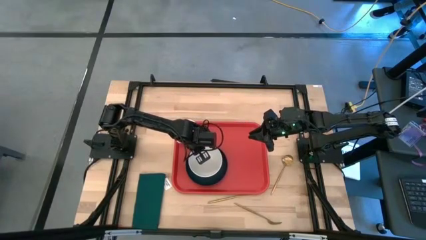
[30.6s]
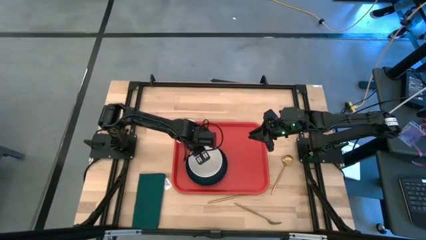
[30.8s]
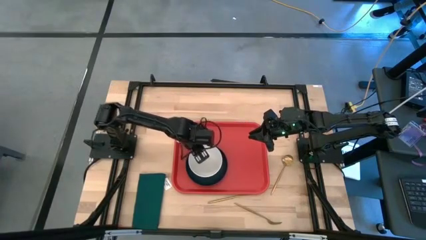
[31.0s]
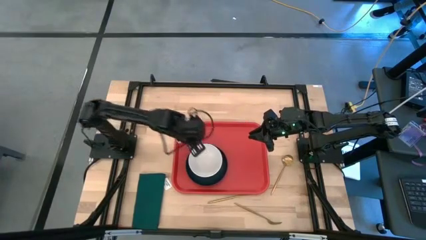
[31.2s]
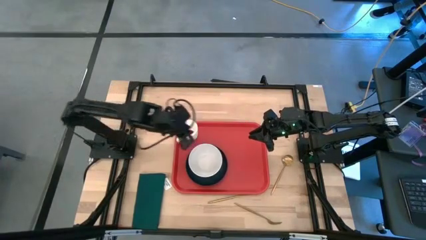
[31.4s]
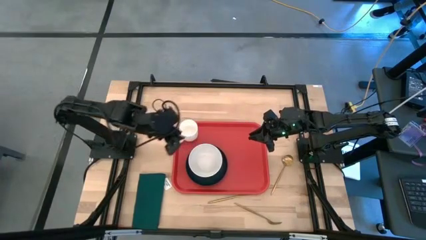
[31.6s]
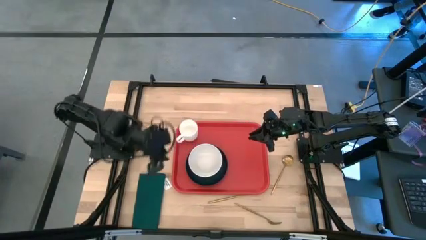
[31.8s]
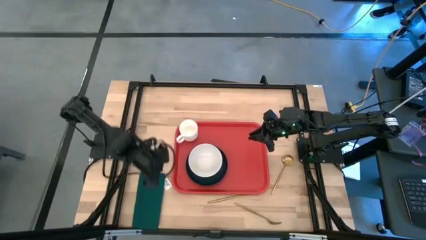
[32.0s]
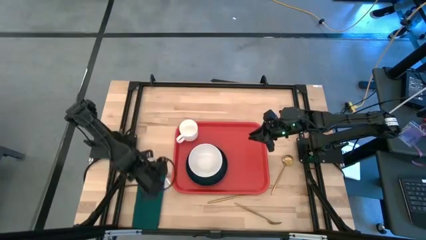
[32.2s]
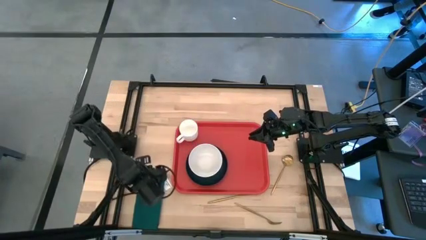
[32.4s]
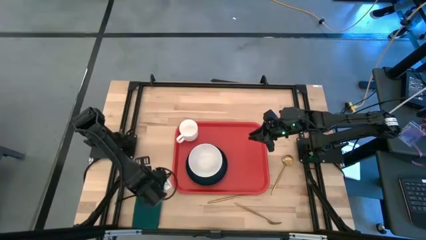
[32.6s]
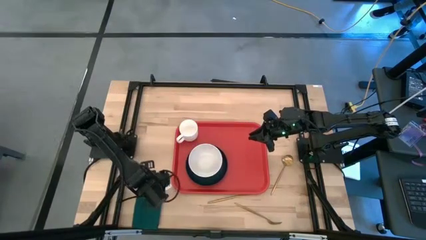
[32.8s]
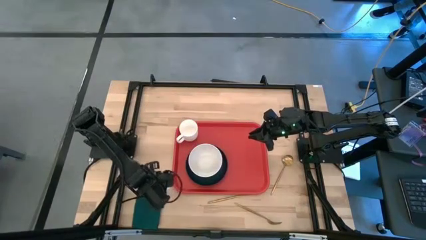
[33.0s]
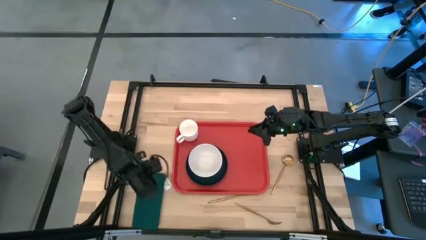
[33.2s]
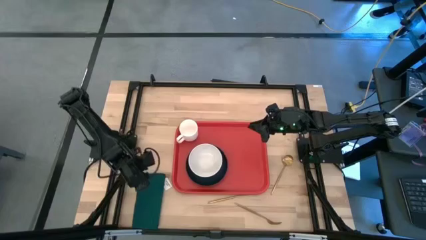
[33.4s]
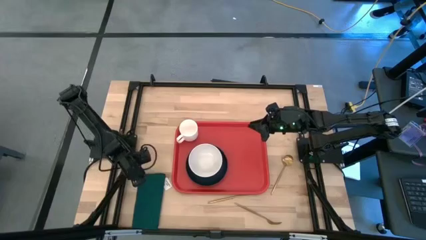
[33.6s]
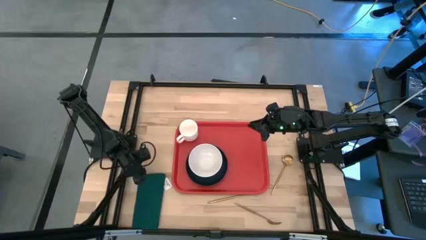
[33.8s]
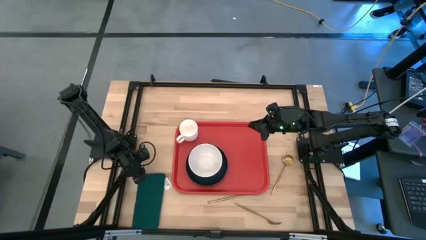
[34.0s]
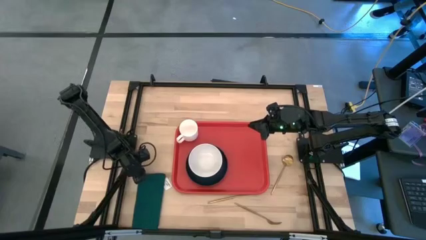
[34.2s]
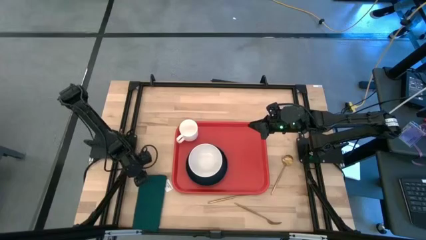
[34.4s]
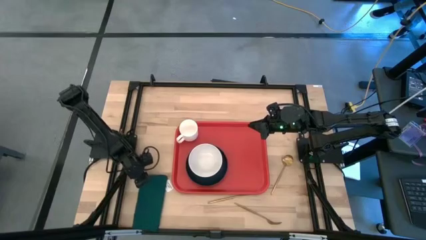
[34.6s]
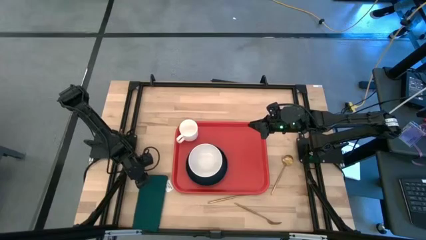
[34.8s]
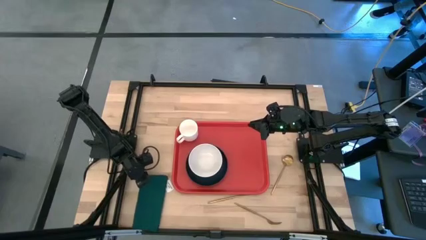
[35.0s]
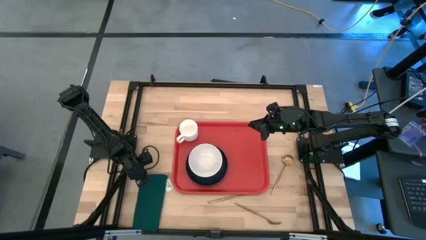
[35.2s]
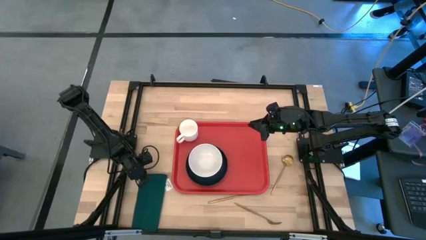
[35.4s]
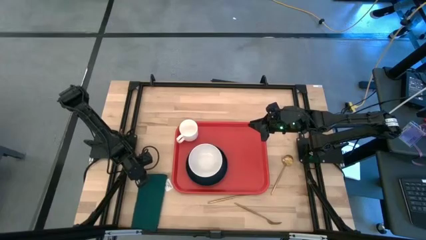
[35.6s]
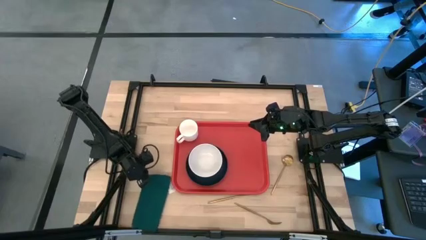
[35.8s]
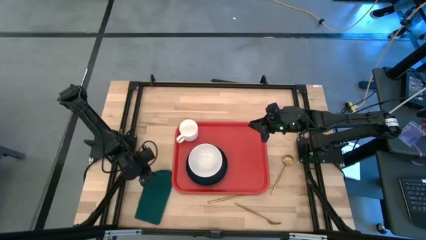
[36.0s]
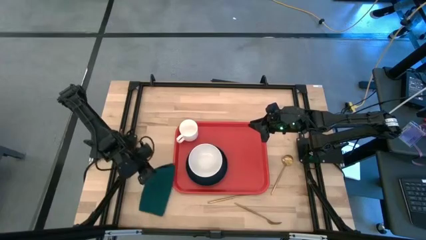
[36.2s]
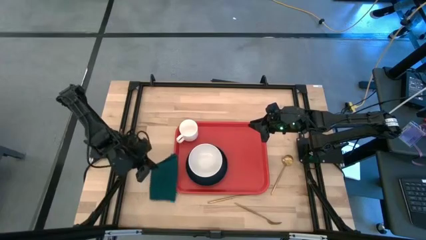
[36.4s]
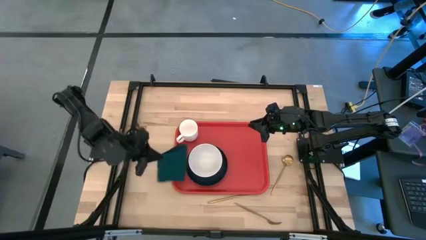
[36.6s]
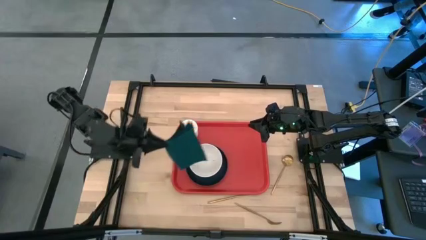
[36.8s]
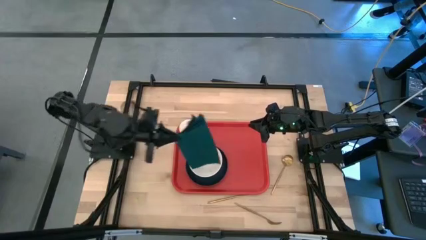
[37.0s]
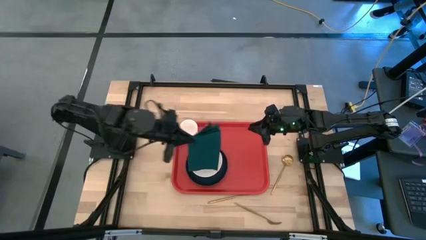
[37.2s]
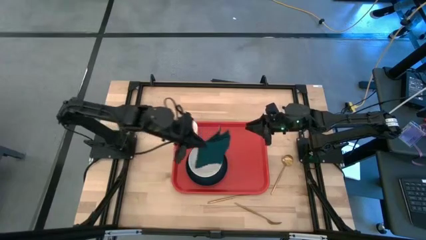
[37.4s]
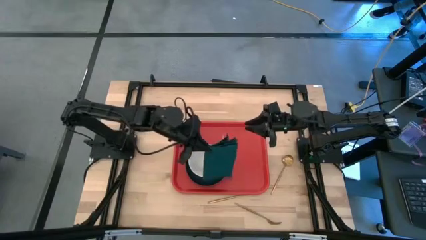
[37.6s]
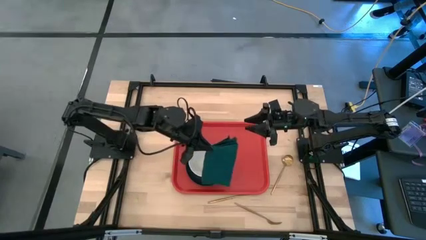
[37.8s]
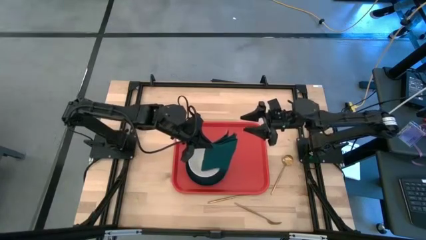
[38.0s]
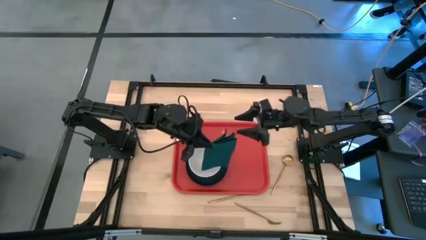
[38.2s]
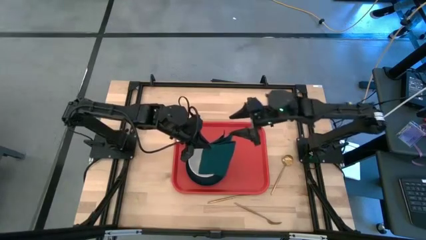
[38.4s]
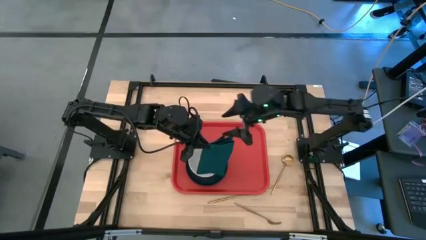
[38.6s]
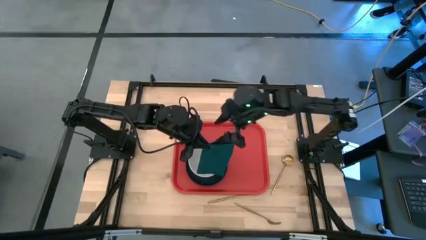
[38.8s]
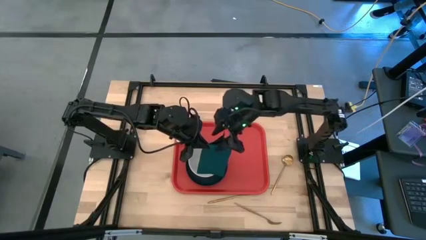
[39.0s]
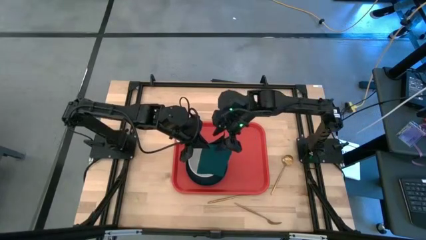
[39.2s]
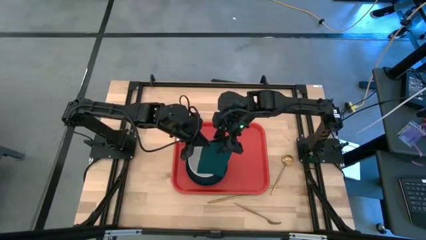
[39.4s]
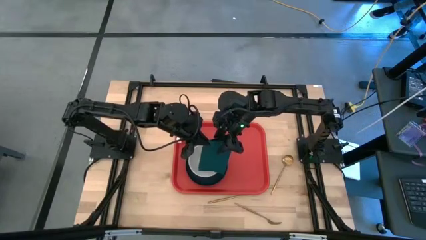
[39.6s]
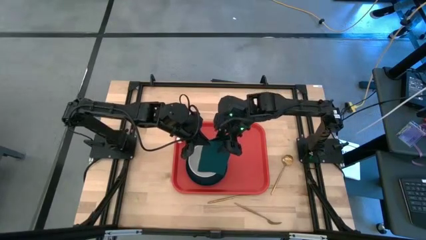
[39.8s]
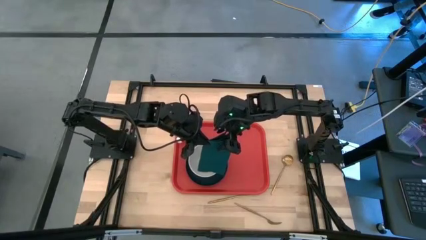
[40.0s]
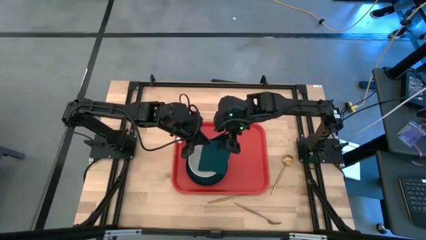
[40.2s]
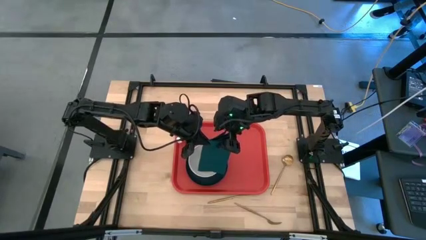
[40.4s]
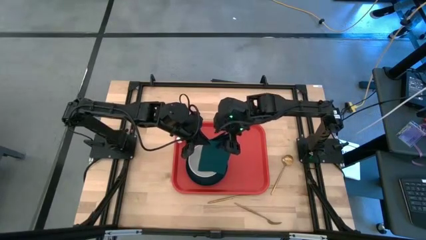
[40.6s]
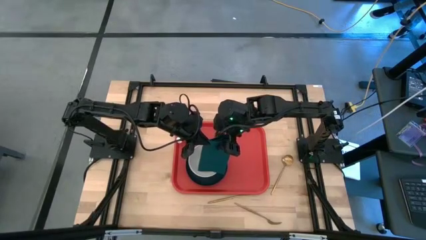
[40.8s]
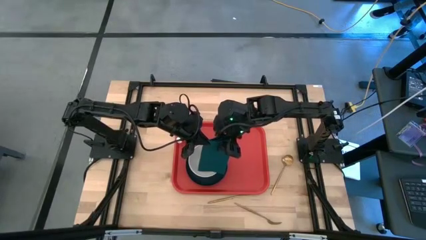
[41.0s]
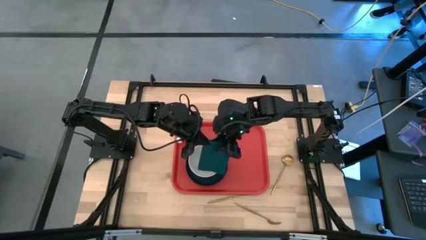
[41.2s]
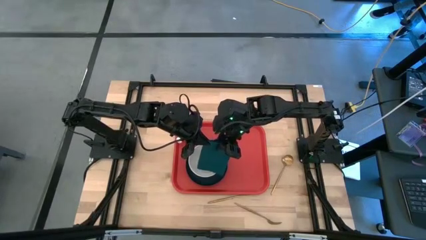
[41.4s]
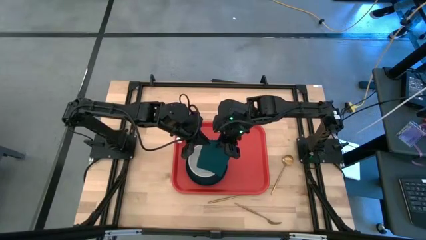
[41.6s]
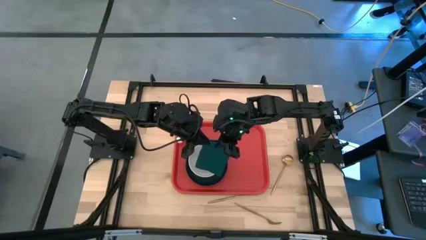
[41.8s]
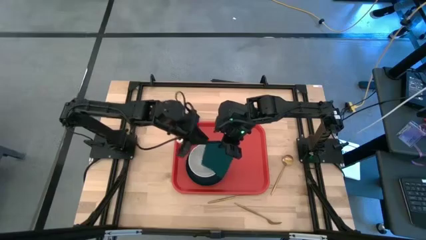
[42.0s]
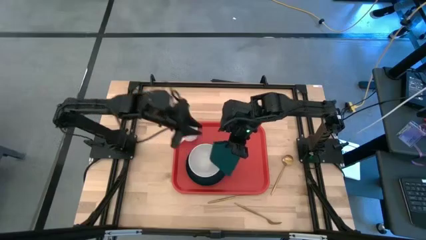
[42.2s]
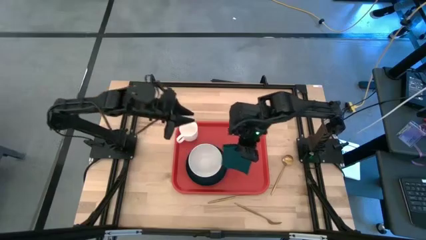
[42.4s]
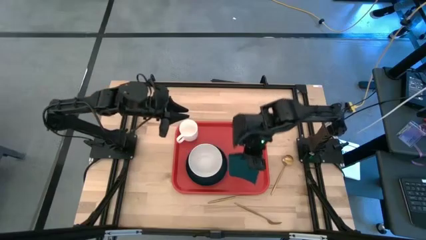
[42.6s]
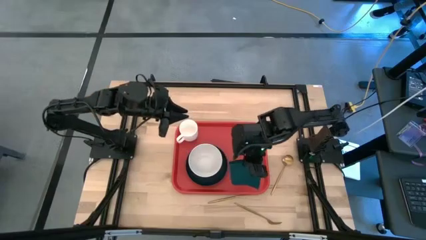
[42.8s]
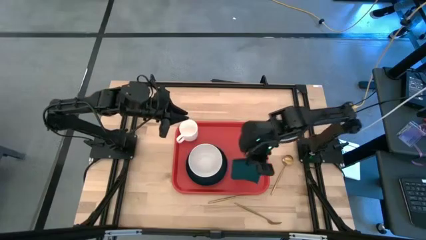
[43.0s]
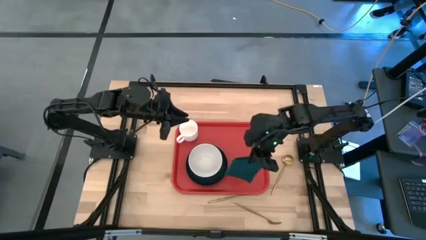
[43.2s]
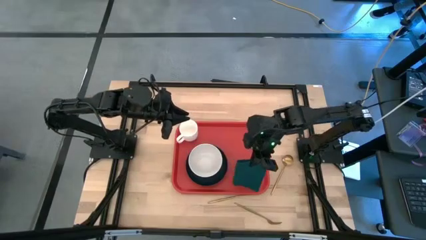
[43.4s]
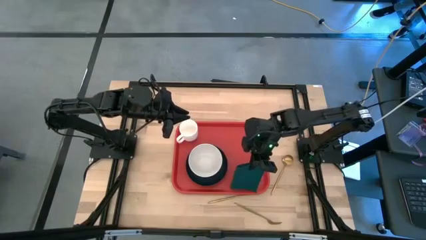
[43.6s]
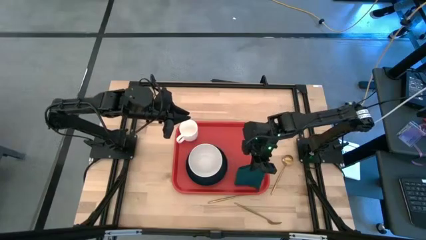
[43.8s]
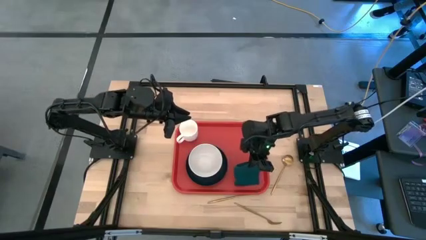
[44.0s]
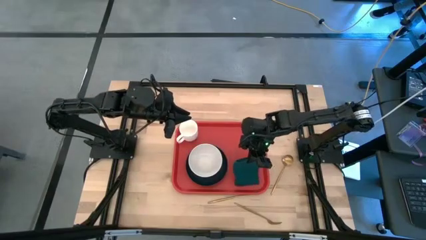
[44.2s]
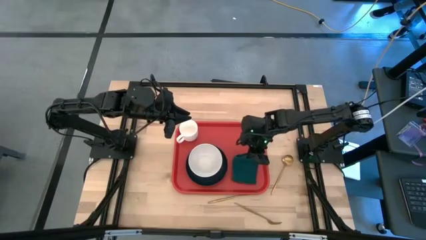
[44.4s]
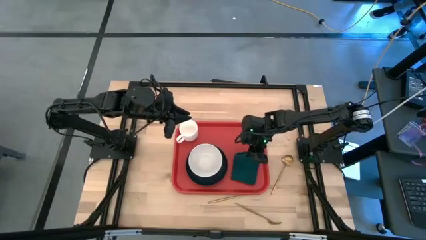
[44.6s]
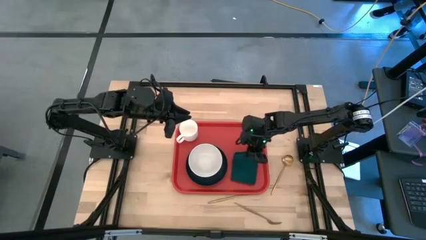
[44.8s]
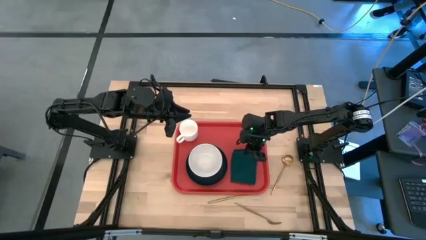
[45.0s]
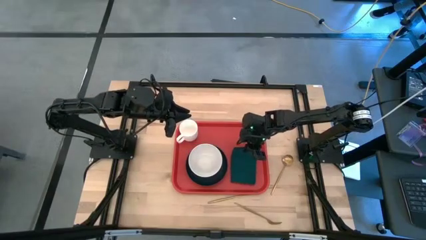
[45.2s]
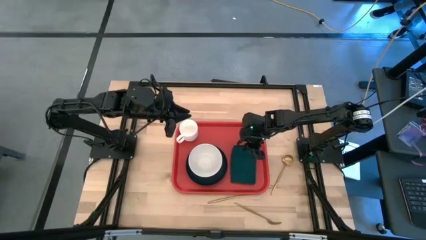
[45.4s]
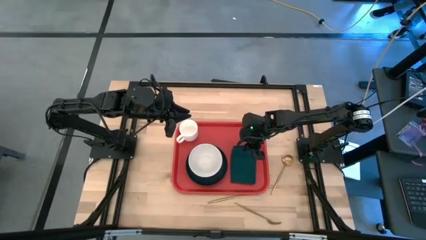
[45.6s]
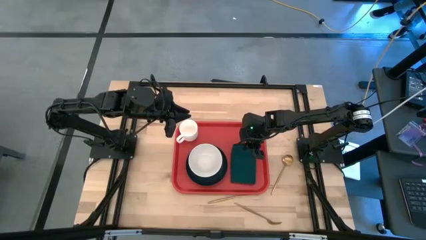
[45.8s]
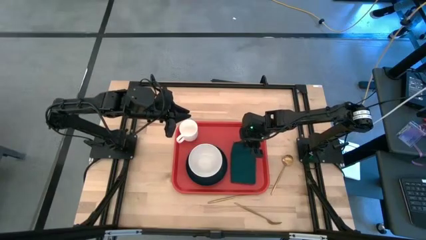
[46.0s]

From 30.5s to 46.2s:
Task: Set up tray
Put the green napkin to the right of the black plate on the red tray
